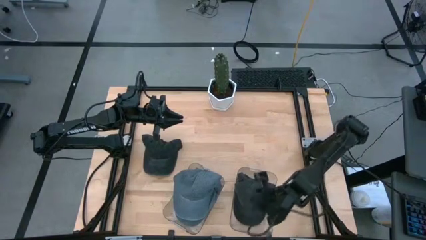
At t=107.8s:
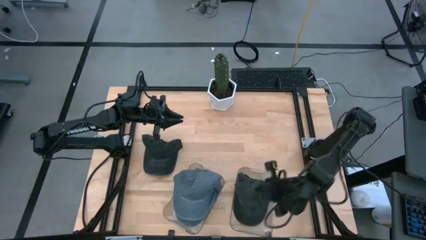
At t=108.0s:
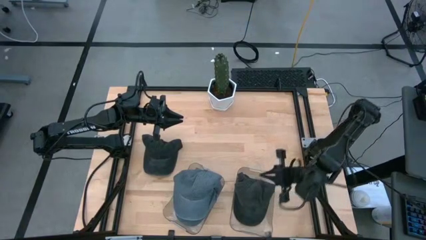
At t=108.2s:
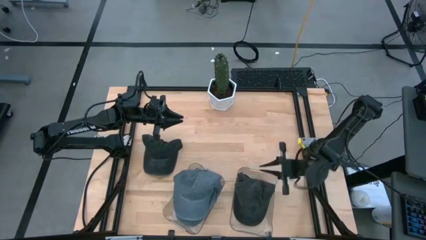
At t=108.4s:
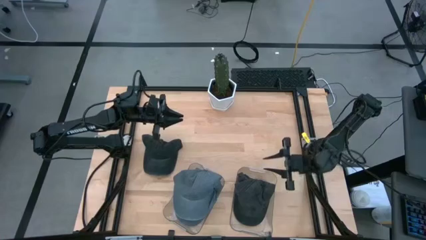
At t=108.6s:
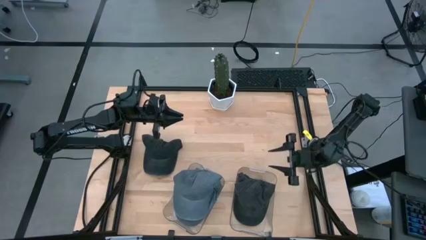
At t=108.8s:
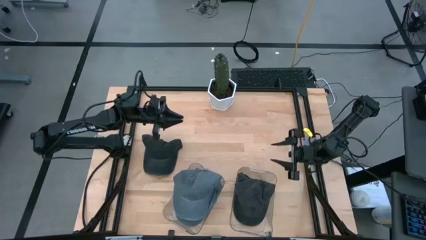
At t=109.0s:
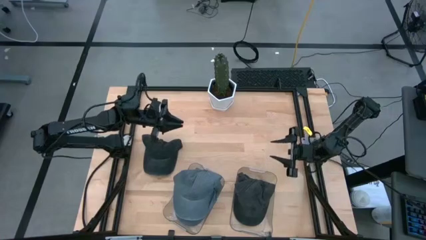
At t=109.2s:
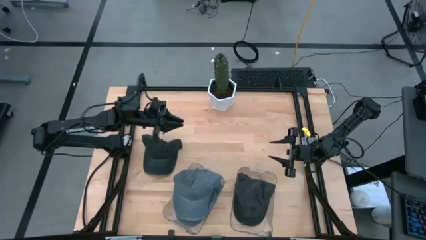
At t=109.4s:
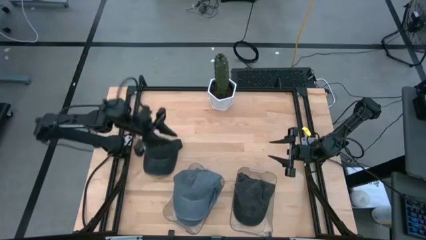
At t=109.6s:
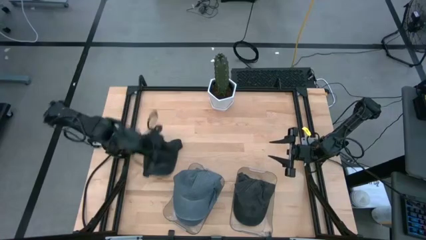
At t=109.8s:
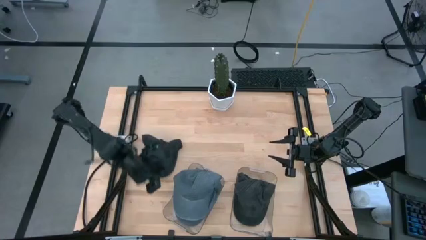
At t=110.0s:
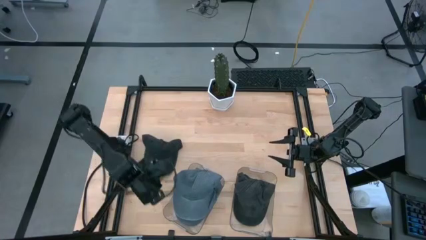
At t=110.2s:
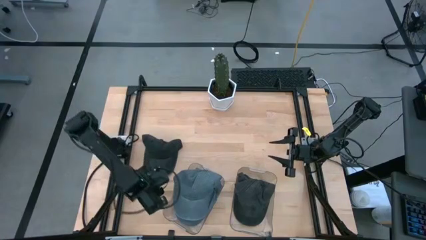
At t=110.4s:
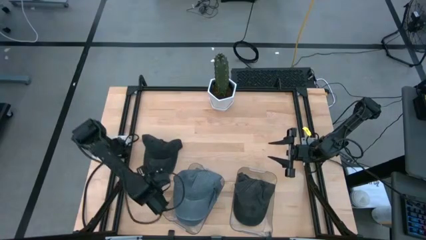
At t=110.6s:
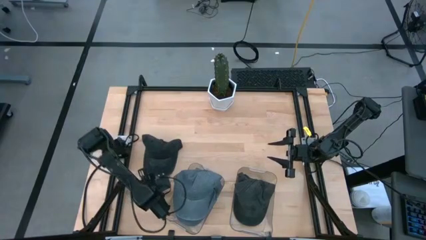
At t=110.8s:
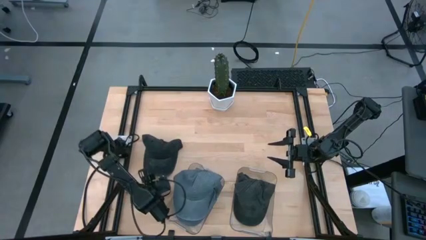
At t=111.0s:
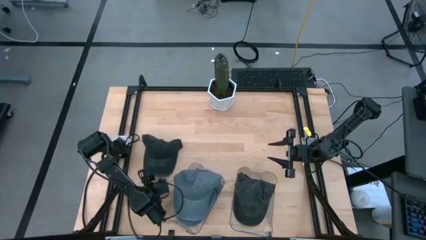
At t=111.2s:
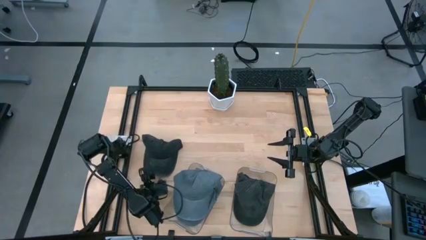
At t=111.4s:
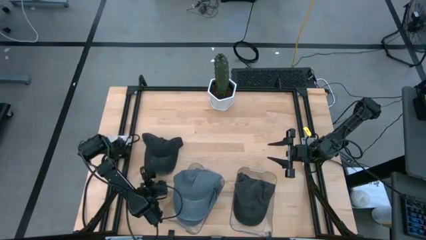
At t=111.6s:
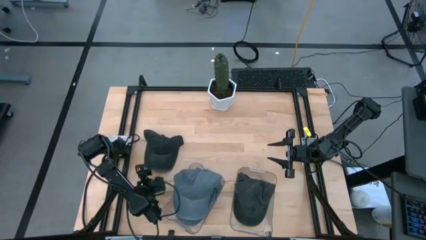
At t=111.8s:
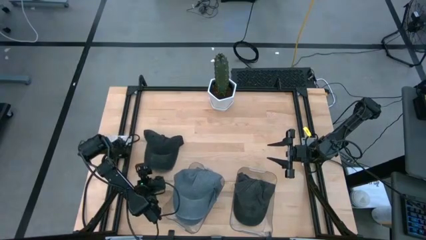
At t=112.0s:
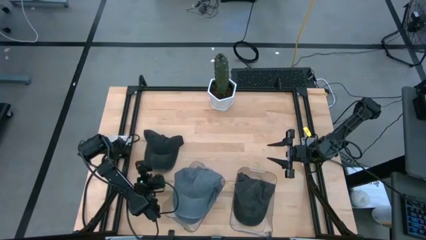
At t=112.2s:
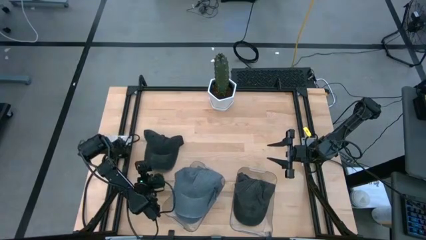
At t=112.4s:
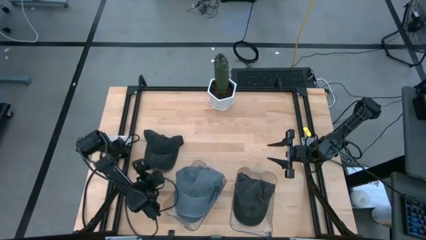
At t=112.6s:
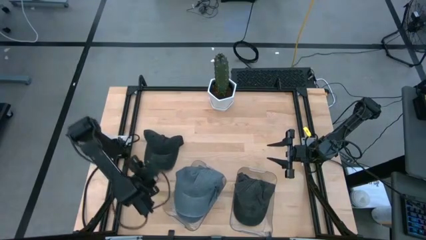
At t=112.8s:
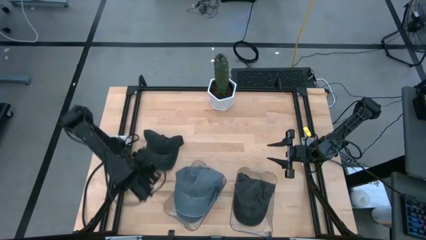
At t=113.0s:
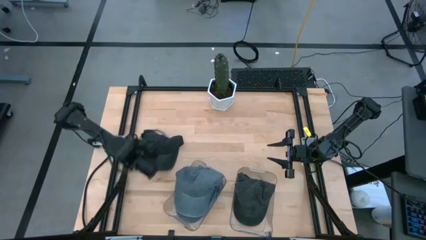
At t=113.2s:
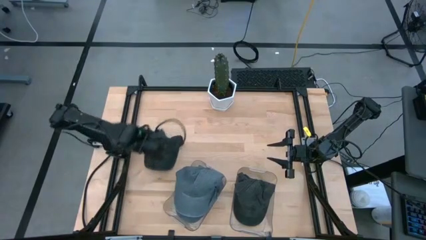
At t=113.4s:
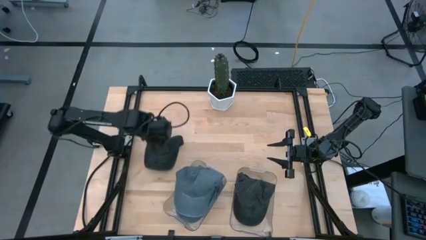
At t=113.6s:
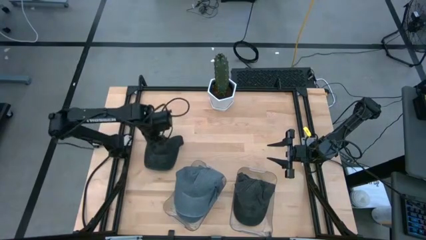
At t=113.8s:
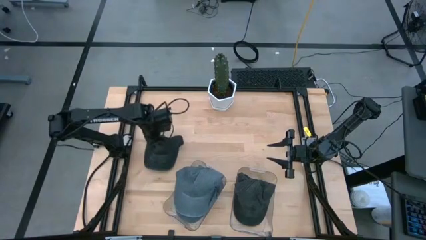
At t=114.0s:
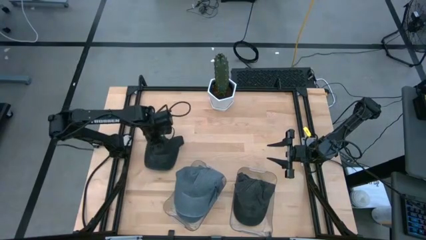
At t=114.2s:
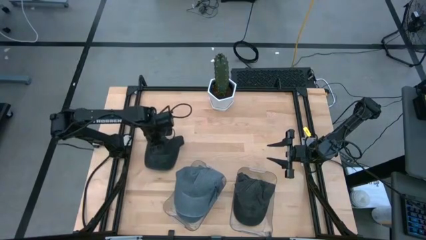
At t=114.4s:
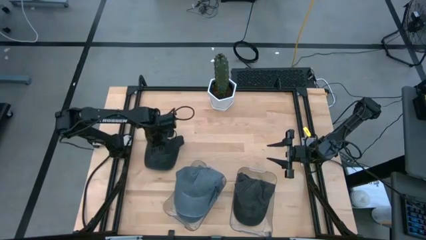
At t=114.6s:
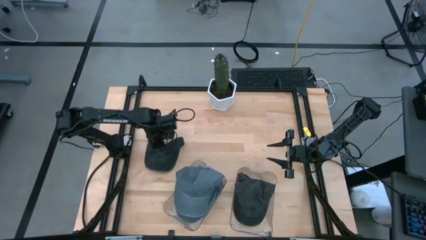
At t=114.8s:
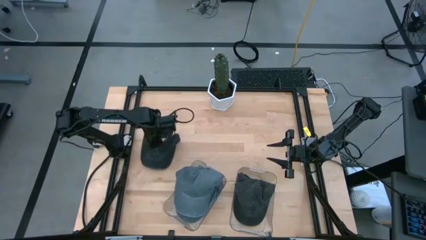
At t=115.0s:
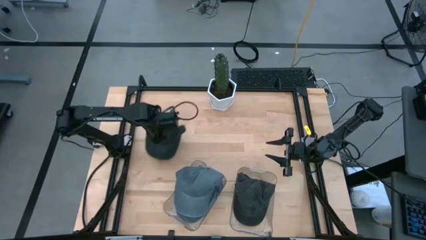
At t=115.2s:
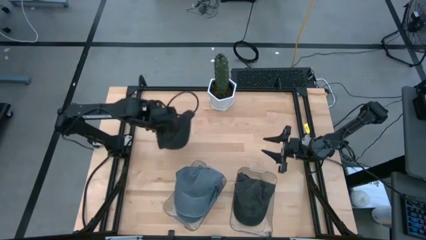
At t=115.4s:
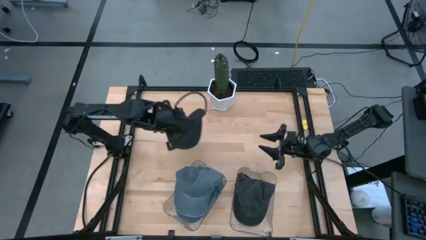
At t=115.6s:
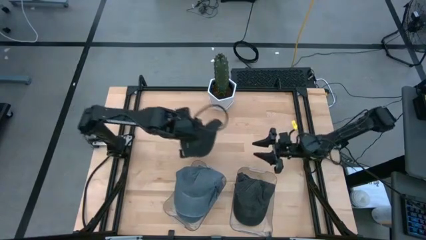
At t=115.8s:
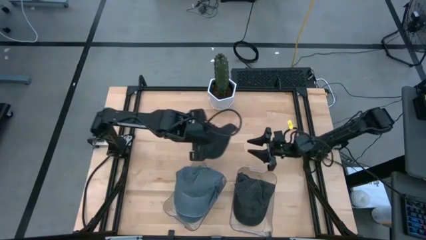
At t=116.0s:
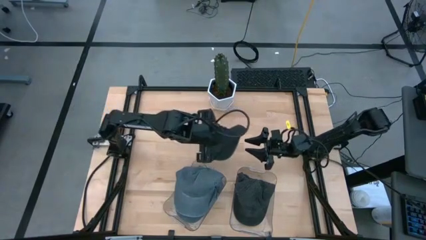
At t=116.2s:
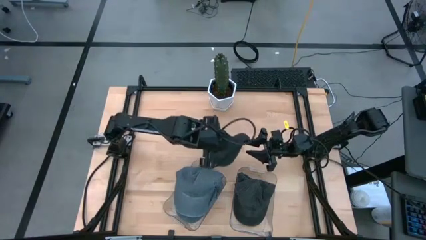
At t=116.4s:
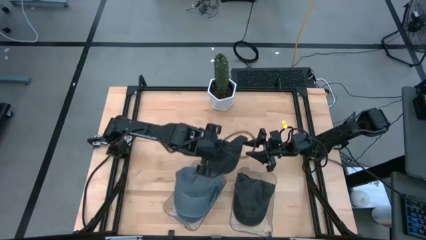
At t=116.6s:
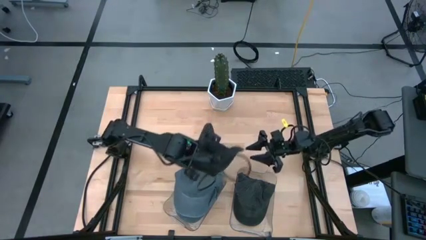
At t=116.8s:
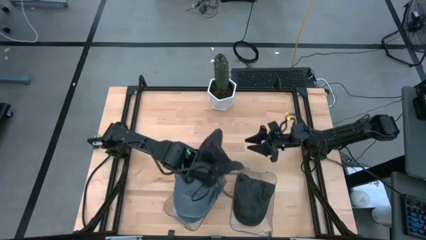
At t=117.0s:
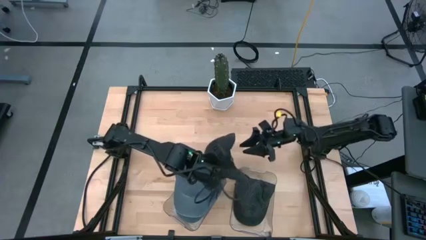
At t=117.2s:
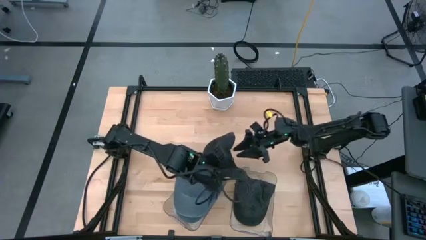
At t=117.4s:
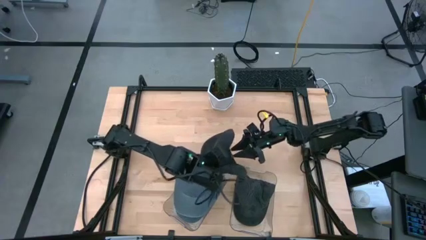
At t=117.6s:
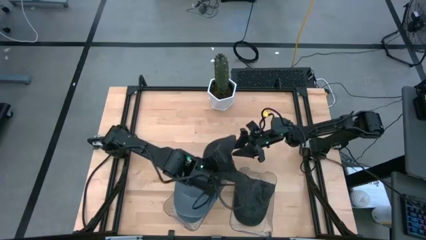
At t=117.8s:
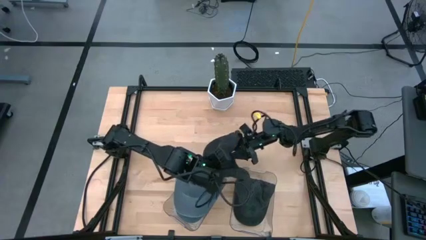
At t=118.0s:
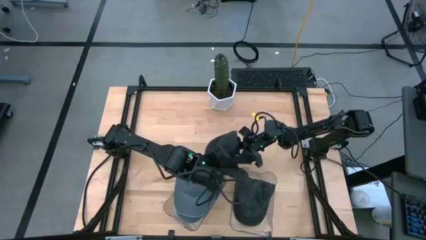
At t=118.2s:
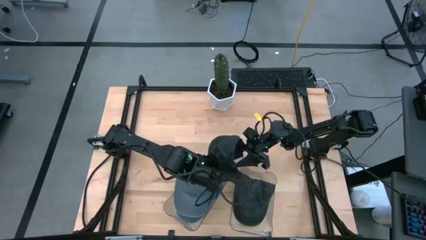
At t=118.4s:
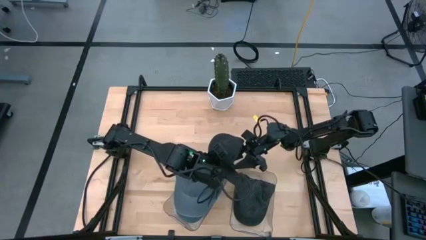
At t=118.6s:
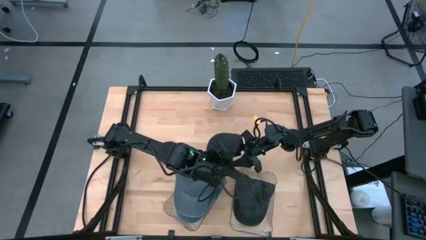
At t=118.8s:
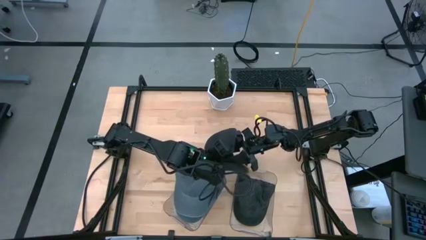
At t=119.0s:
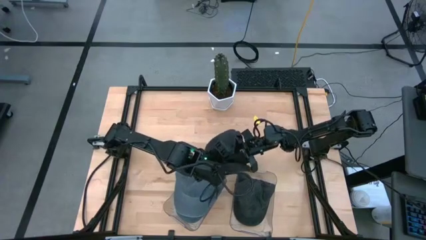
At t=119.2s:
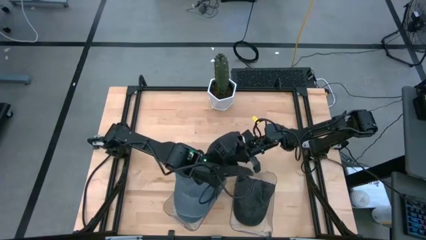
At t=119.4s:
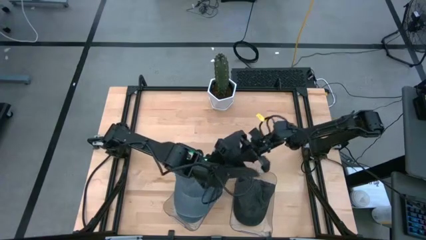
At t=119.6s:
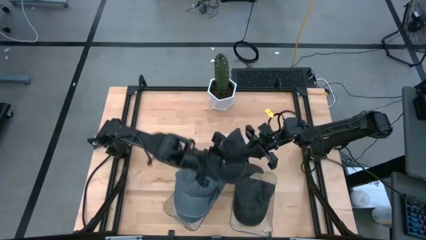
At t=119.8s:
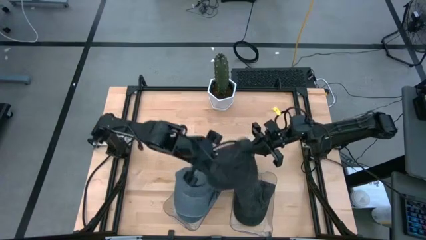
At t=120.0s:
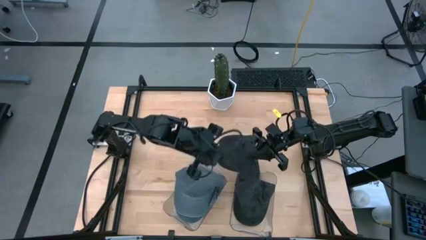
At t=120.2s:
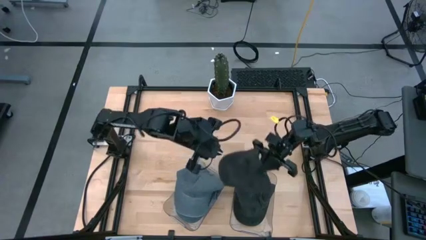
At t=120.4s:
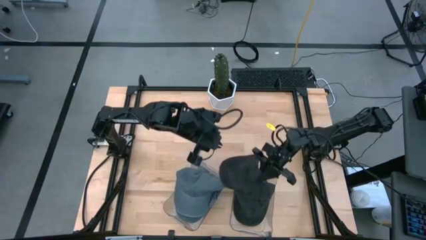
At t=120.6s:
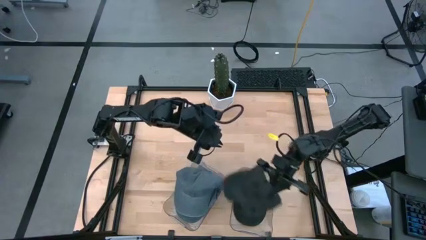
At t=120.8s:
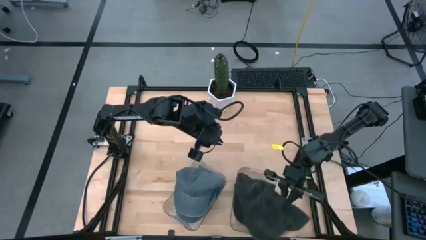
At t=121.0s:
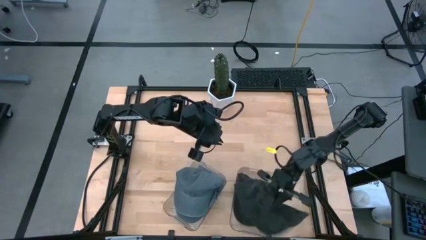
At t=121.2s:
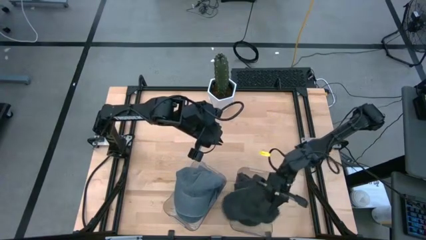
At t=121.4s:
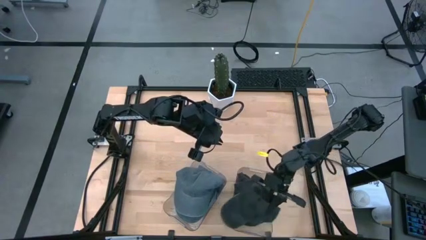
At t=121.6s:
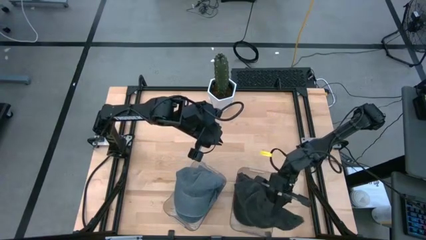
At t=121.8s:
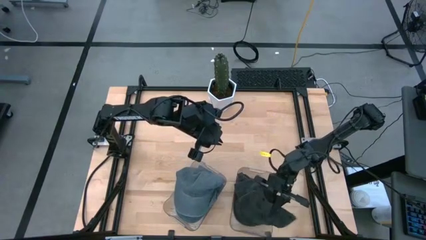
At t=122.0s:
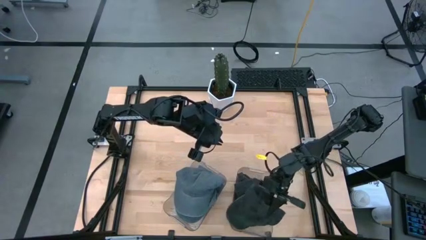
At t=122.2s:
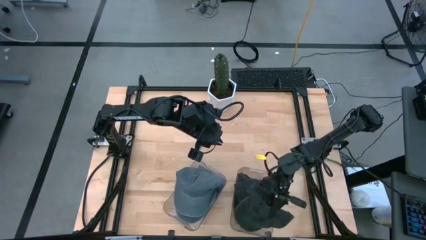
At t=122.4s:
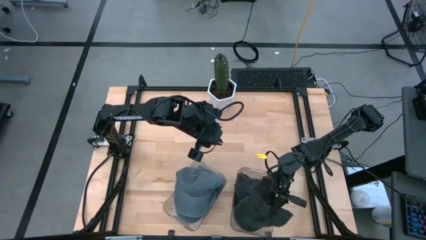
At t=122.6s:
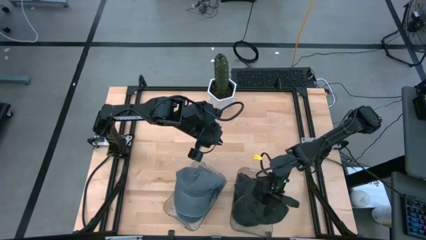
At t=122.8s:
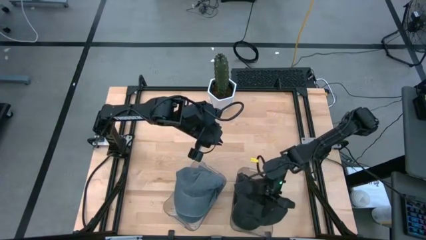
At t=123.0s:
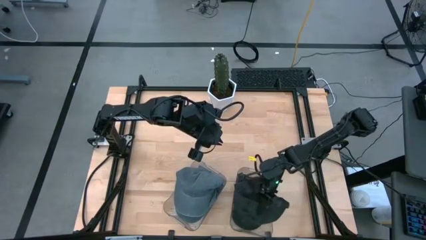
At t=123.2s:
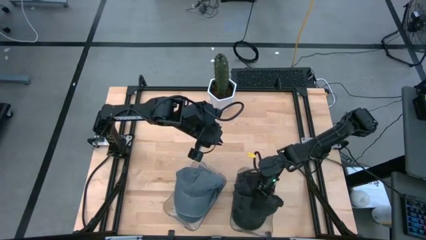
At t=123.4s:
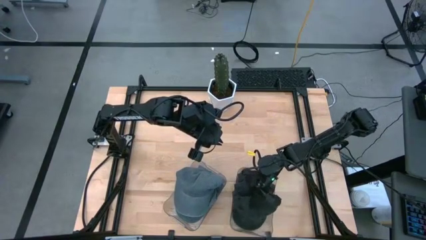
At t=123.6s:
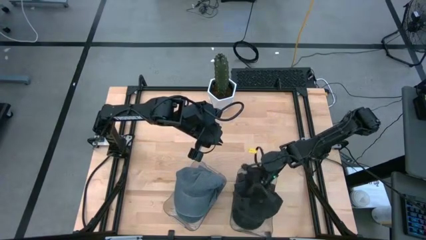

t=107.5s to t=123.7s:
Task: Pick & Place hat
Put the black cap into the right transparent bin

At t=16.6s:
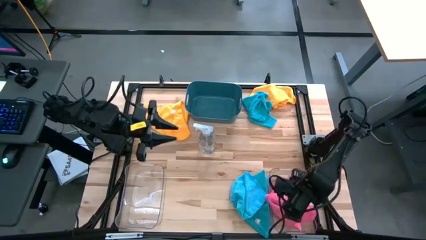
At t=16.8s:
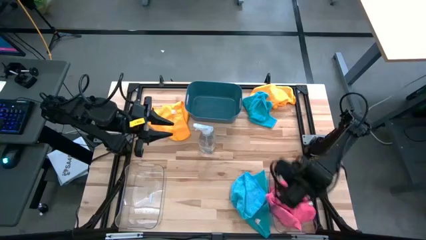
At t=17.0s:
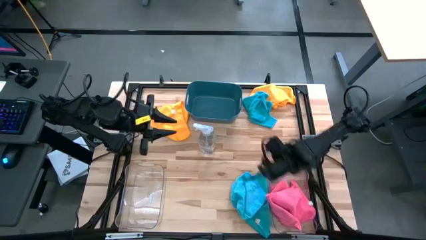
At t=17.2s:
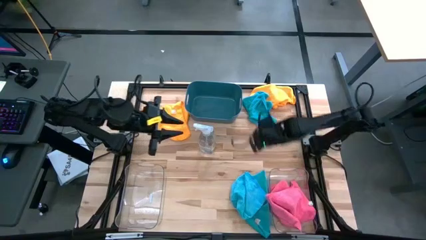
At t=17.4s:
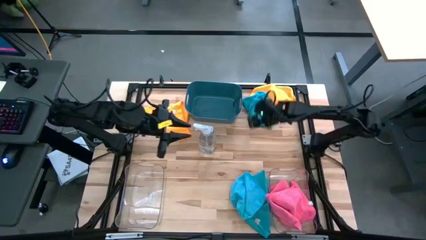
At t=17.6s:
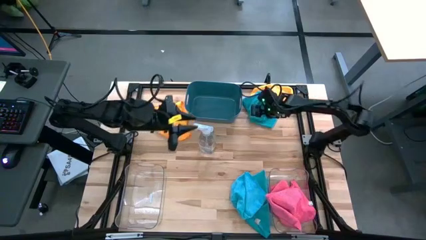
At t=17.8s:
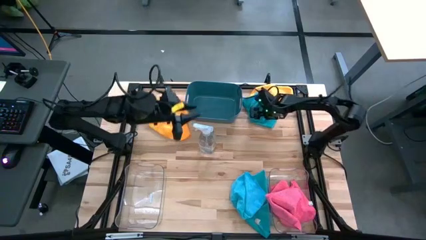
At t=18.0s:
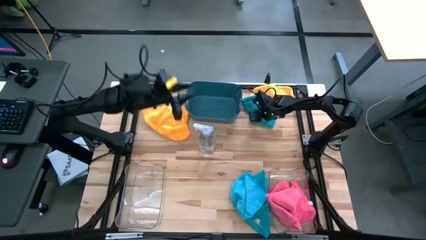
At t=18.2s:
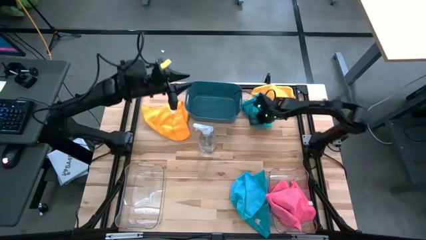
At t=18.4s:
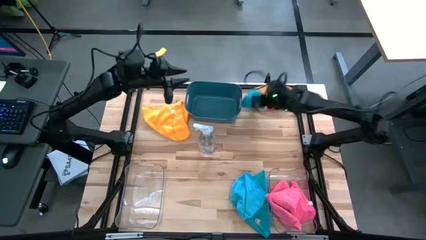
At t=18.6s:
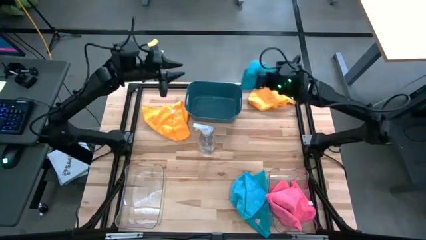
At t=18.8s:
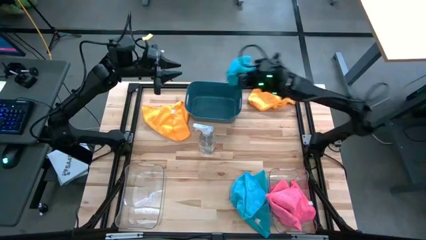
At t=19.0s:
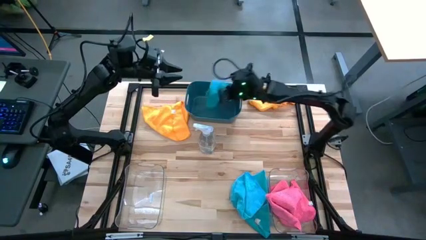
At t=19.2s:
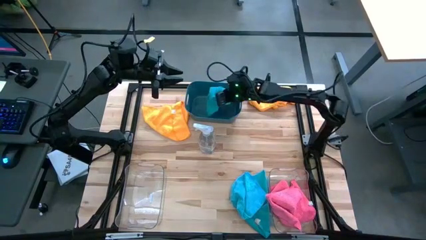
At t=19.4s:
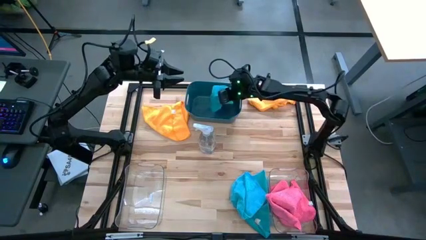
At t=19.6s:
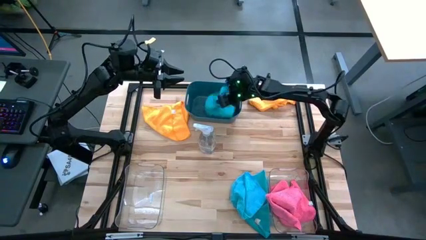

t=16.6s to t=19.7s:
Task: Sort microfiber towel by color & place in baskets
Put the top blue microfiber towel into the blue bin
